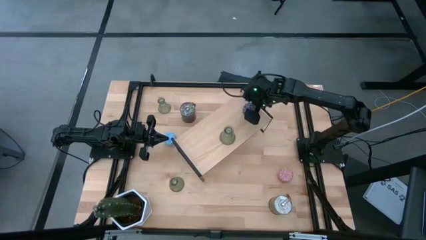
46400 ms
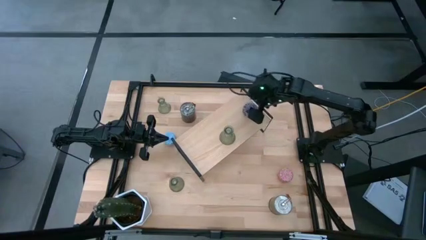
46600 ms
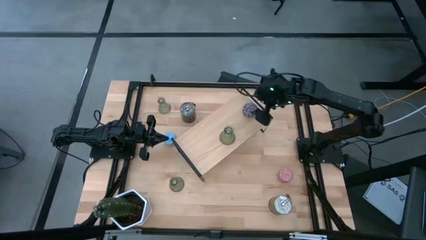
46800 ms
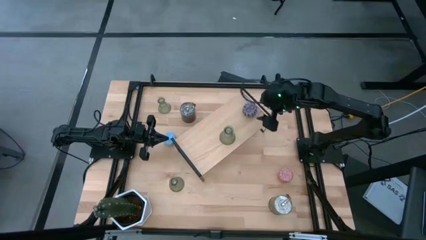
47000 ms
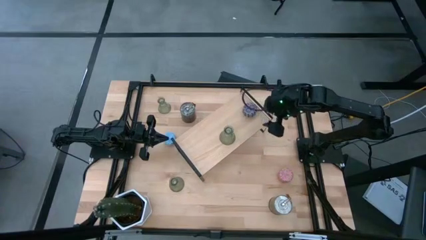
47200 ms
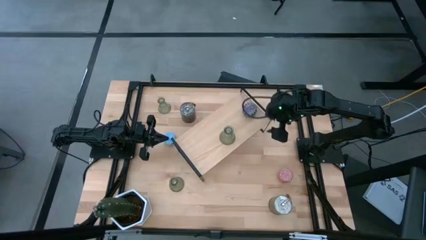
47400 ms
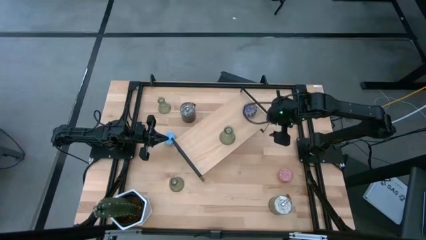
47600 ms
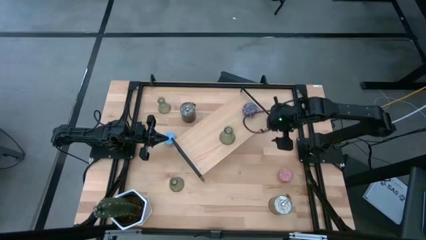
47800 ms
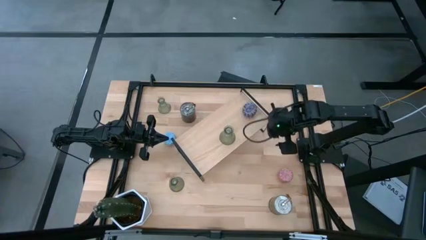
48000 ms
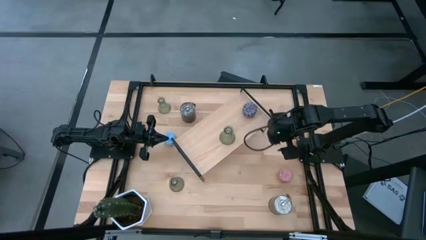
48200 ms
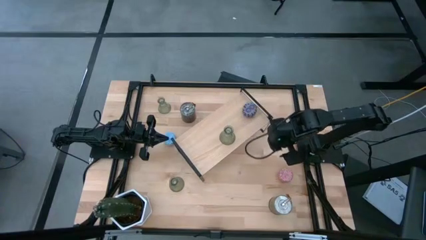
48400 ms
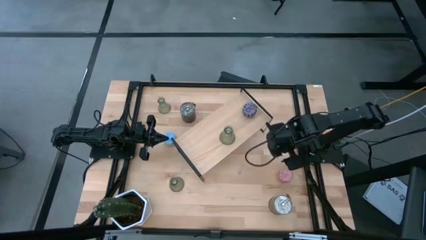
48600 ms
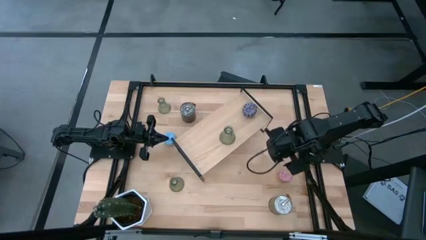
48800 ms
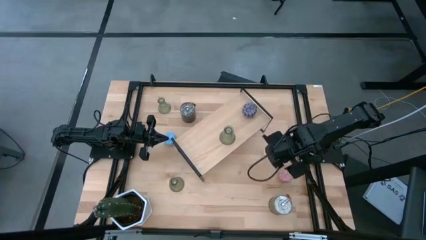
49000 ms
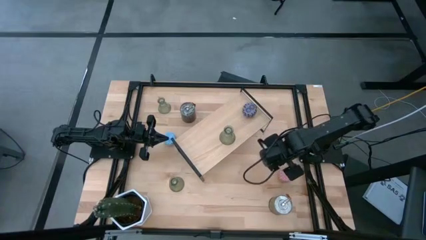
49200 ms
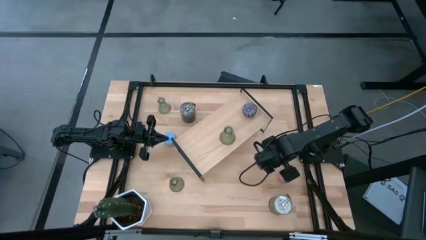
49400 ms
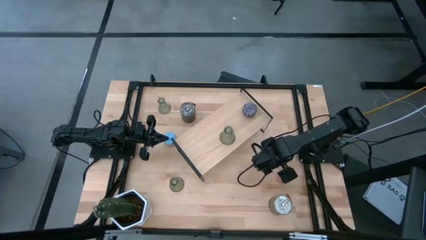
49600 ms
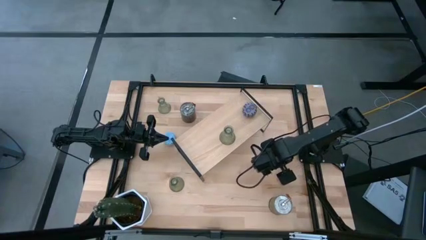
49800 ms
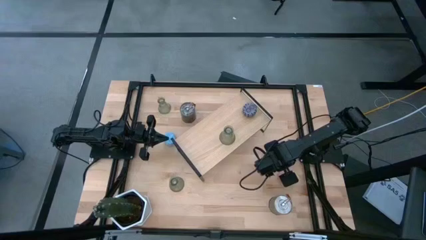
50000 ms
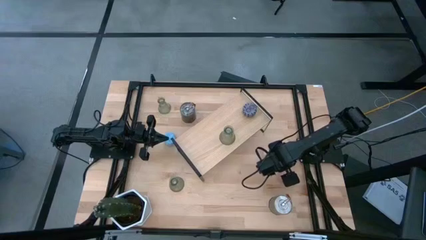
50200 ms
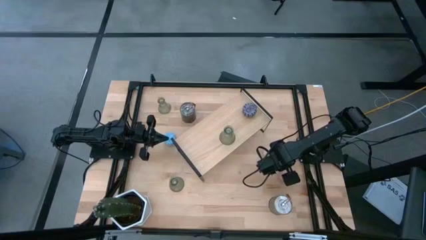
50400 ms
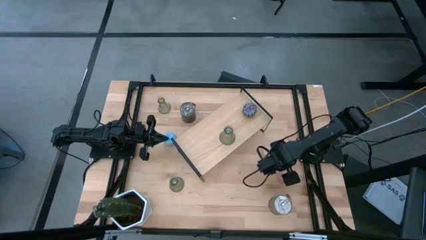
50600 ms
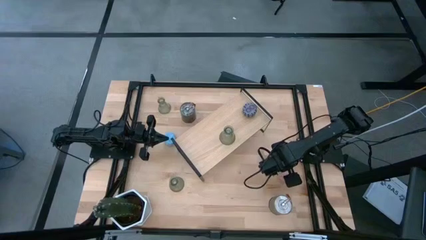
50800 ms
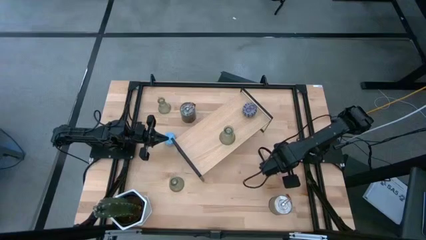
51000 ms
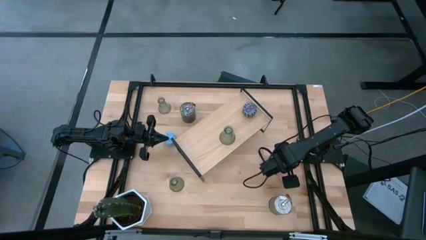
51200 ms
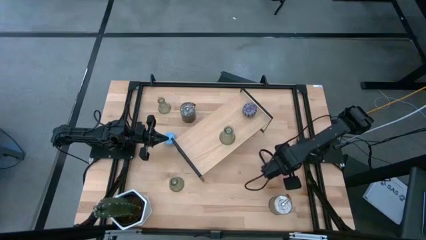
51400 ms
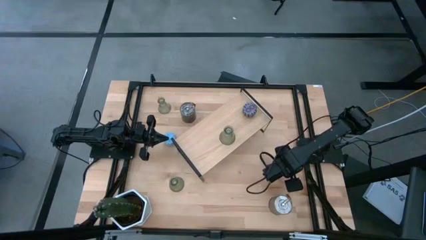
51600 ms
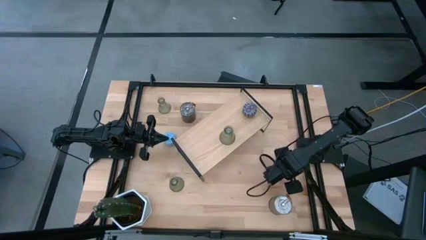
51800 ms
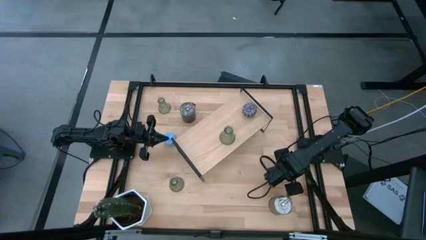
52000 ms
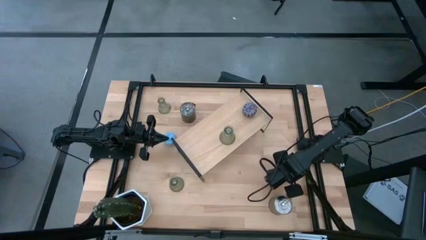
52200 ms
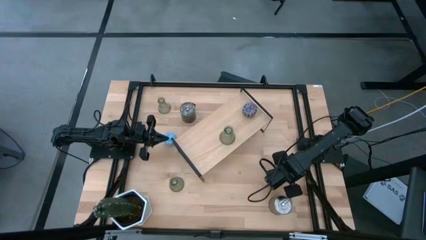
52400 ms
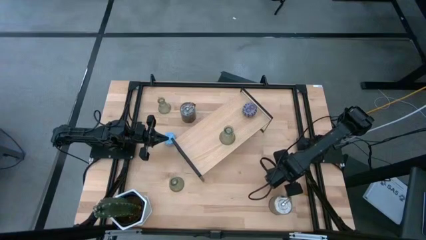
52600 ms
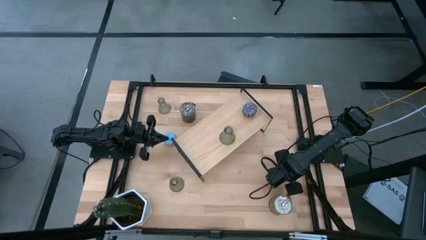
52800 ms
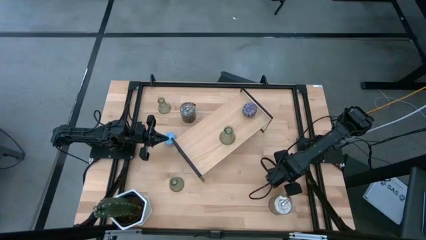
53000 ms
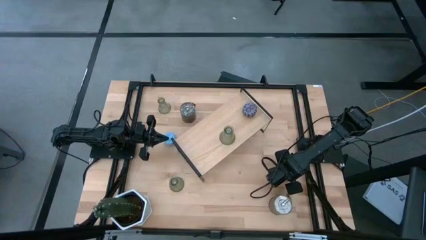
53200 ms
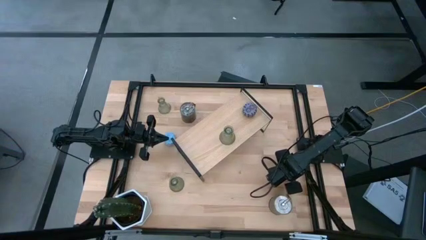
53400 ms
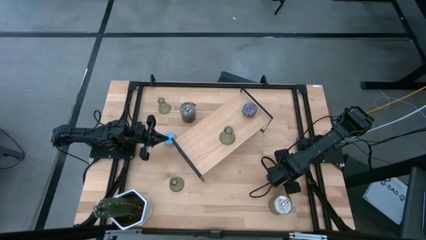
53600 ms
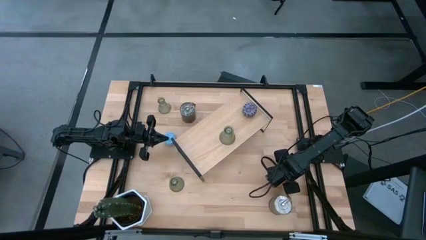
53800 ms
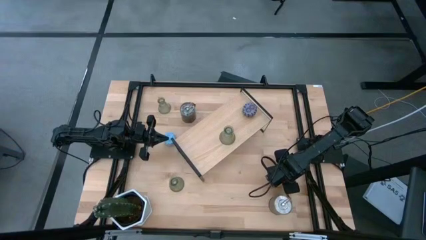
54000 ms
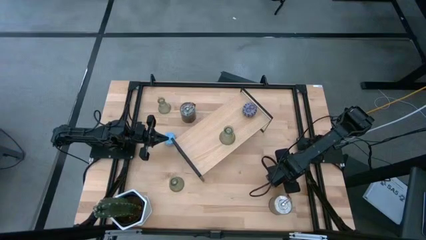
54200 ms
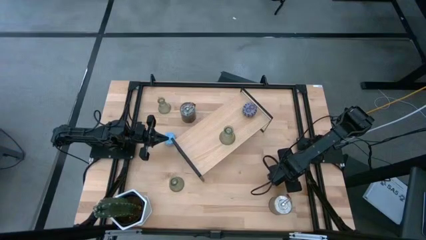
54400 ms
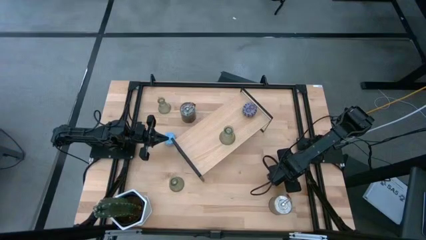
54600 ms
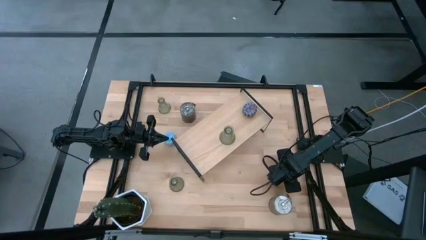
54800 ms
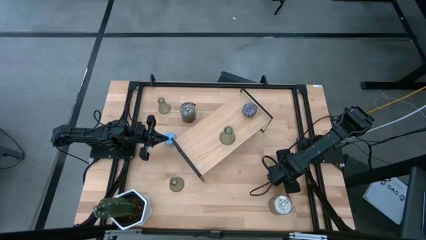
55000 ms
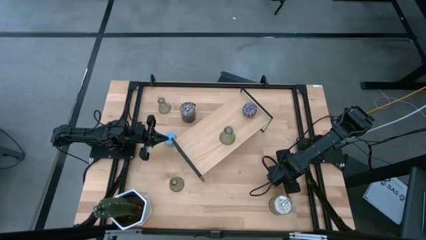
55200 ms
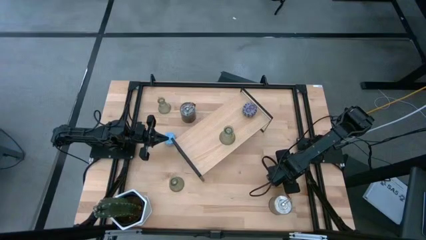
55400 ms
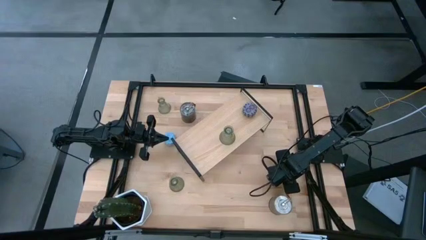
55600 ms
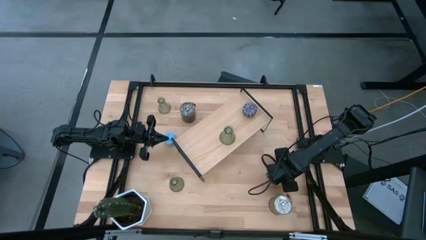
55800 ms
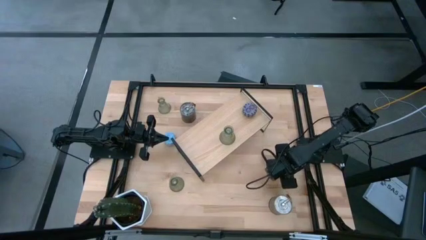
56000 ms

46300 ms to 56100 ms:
Task: Pick & Place candle stick holders
Put the pink patterned scented candle on the shelf

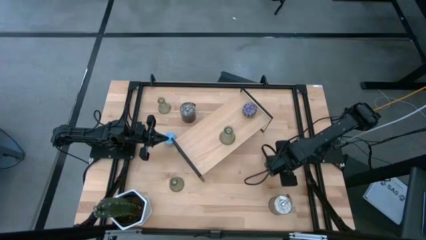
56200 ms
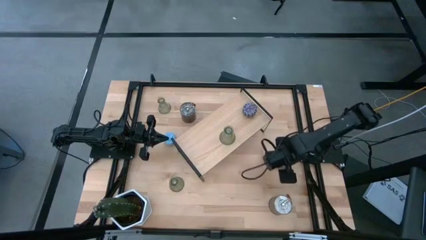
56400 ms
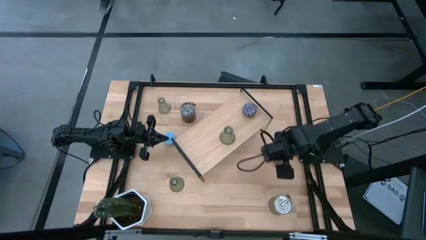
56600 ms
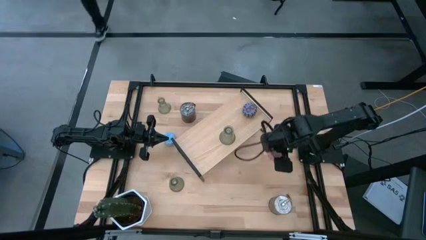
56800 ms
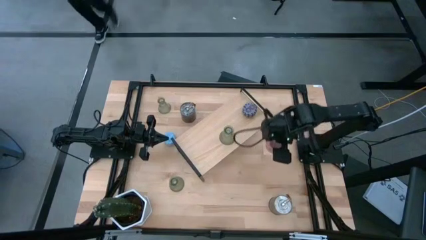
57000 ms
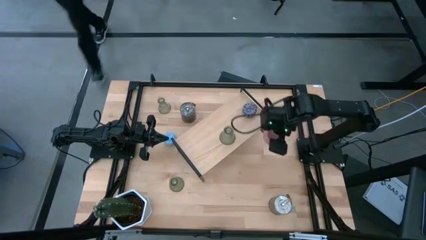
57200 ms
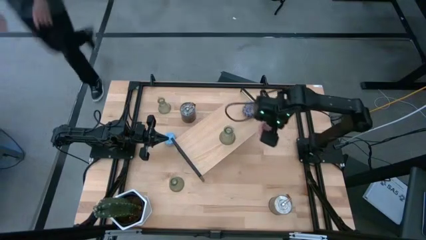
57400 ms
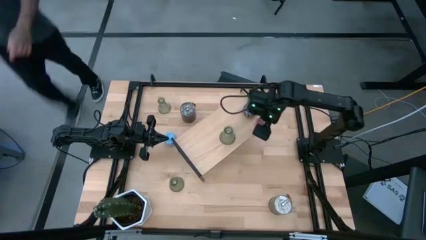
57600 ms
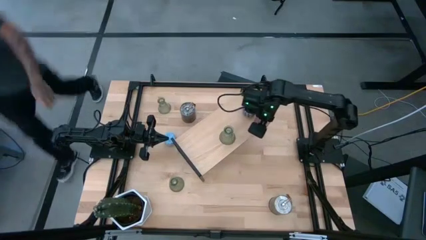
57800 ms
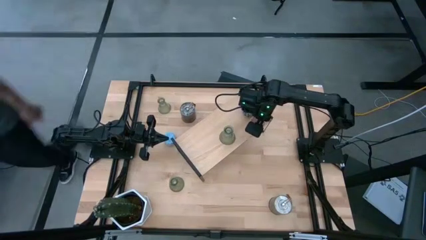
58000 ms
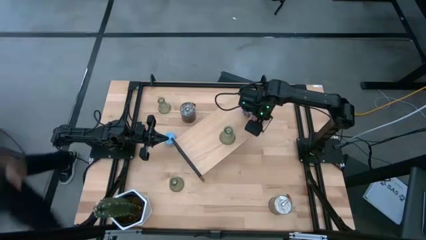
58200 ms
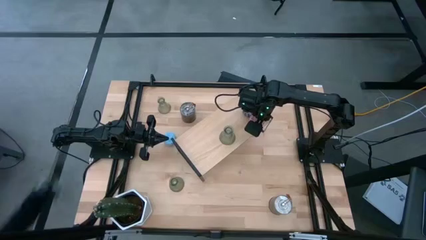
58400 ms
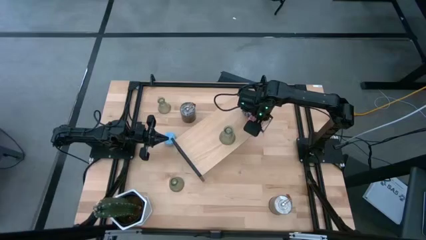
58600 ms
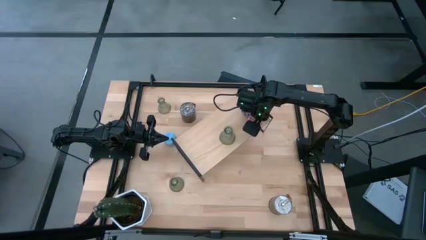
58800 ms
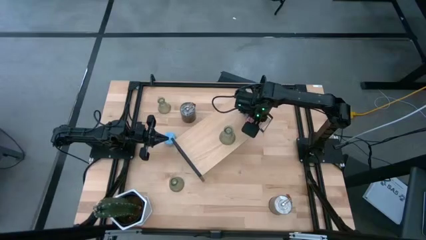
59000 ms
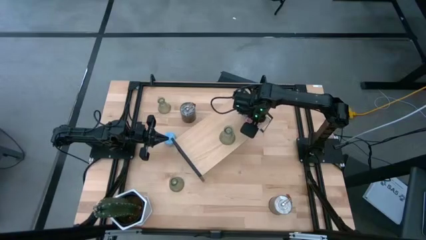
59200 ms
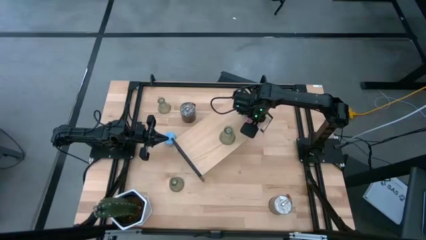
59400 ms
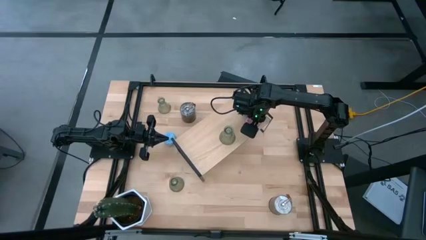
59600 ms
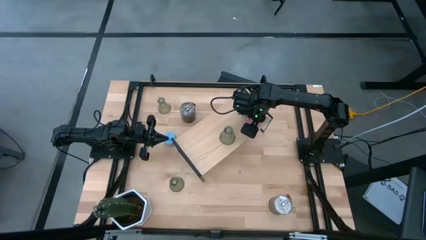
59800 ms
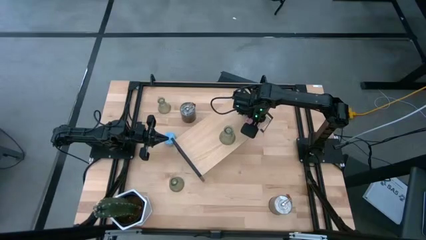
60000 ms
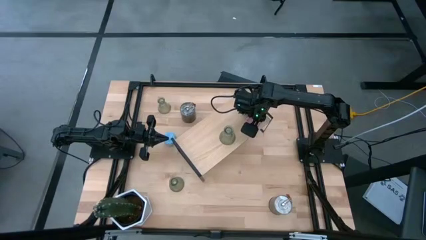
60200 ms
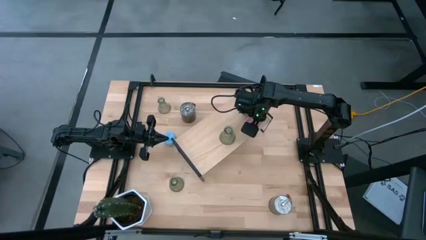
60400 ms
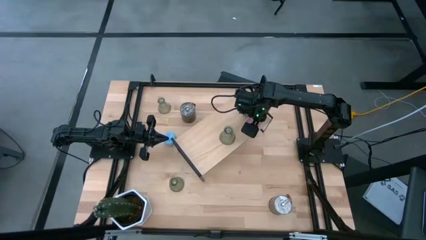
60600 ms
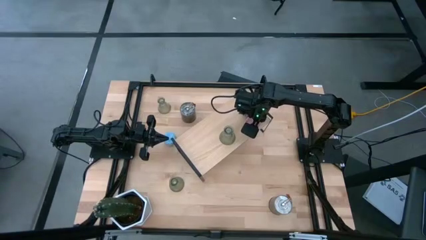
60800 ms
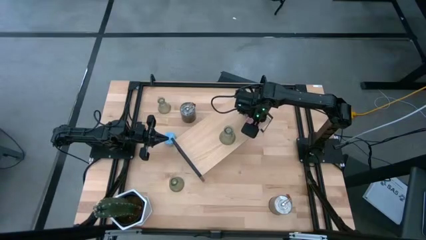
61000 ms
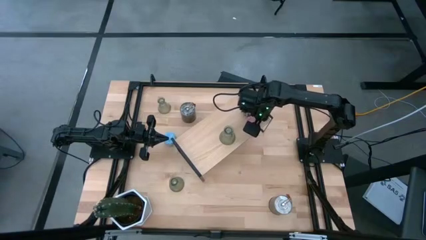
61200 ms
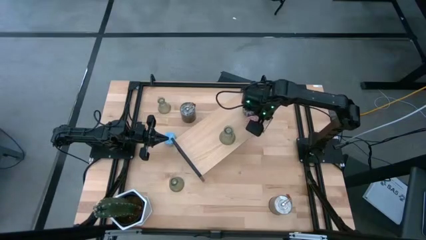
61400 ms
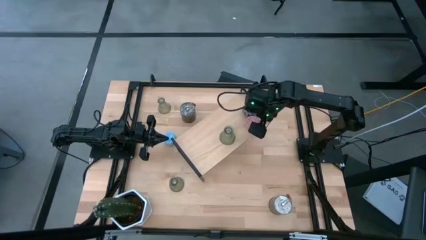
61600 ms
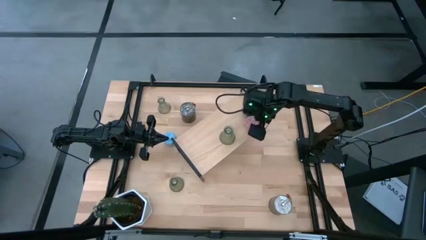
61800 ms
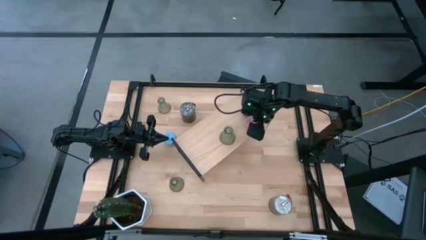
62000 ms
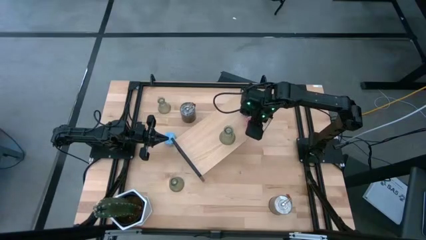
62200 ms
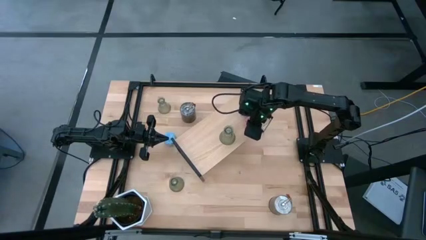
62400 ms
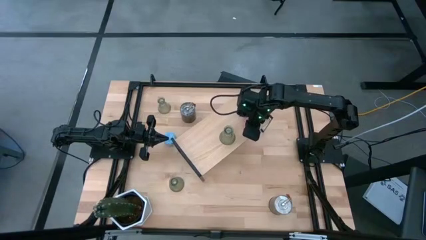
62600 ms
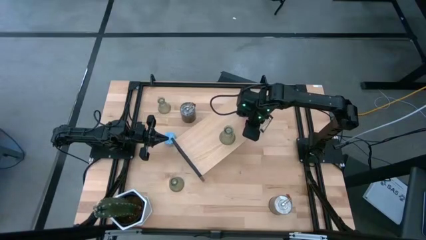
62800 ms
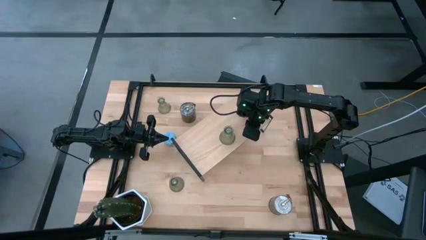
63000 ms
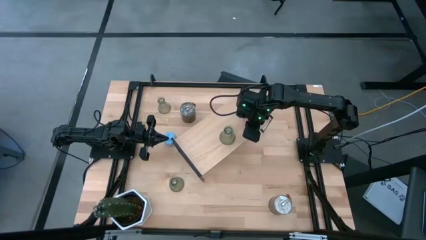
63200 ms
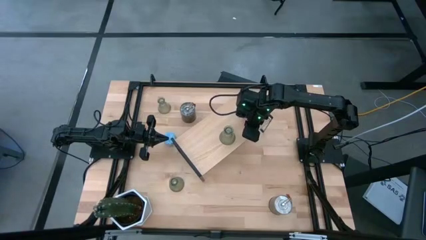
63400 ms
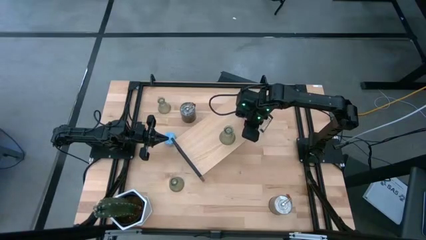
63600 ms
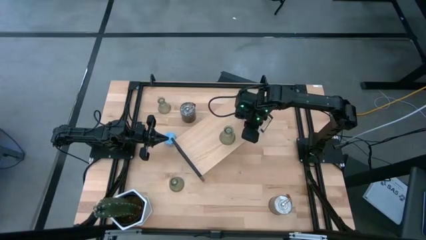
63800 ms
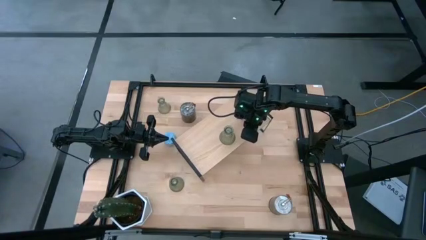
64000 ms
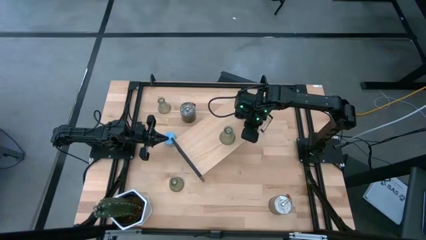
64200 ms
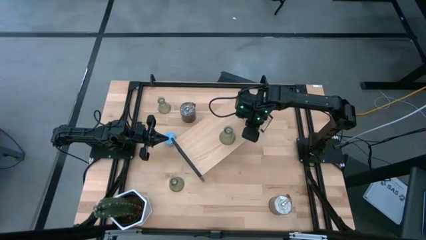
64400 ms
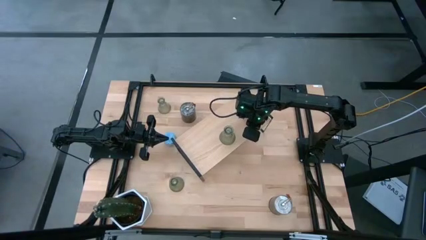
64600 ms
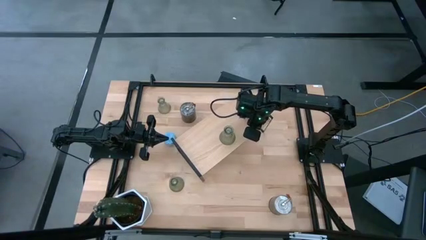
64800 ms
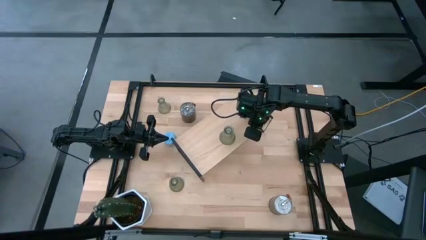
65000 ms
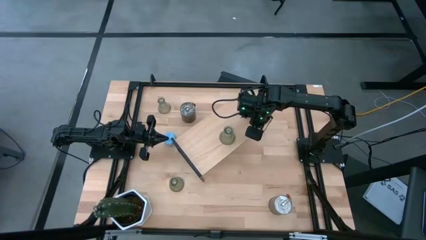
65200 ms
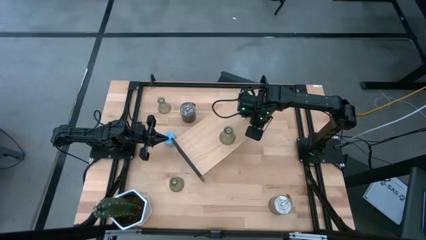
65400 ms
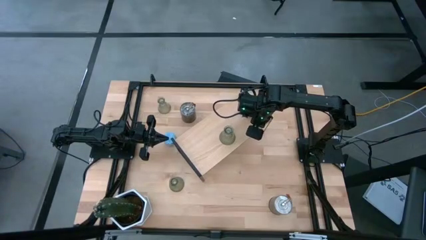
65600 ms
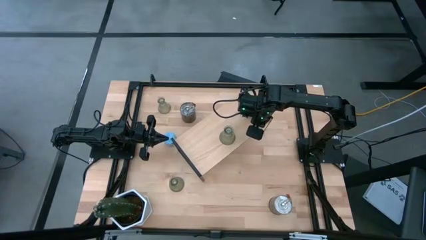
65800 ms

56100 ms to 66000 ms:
Put the pink patterned scented candle on the shelf
